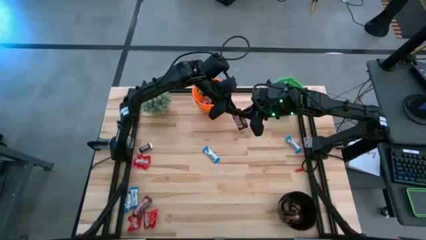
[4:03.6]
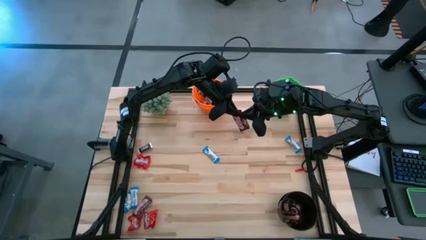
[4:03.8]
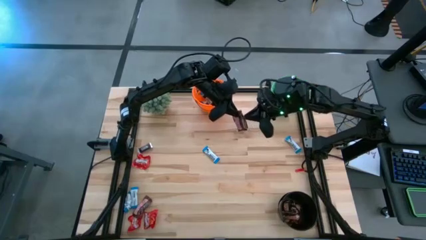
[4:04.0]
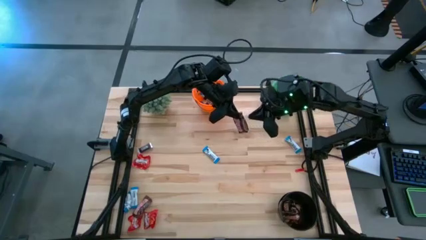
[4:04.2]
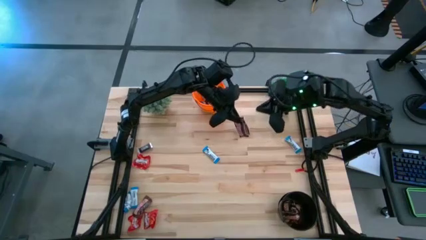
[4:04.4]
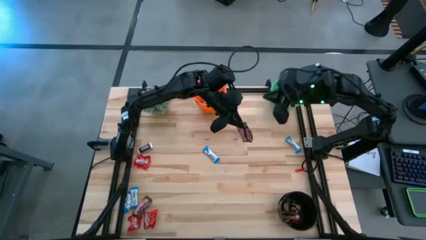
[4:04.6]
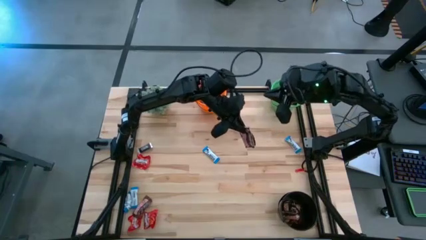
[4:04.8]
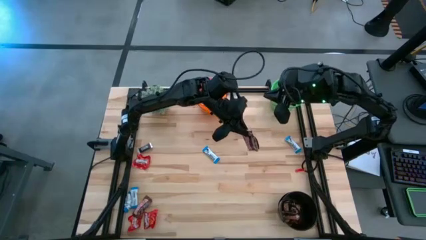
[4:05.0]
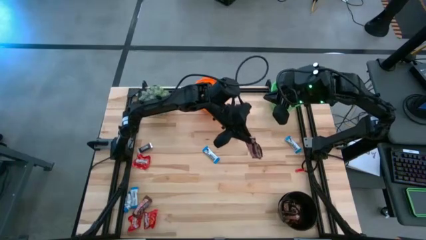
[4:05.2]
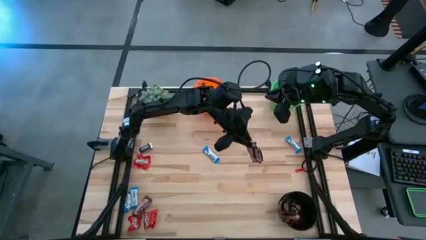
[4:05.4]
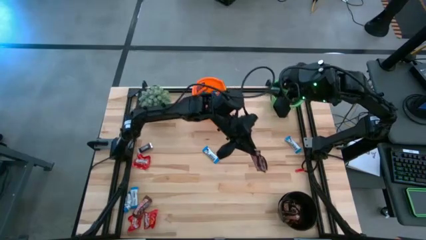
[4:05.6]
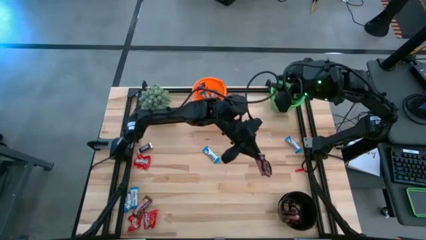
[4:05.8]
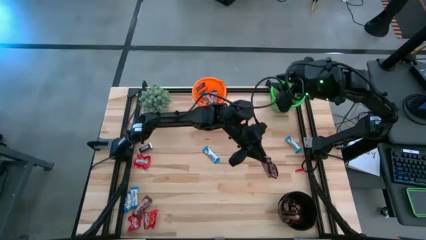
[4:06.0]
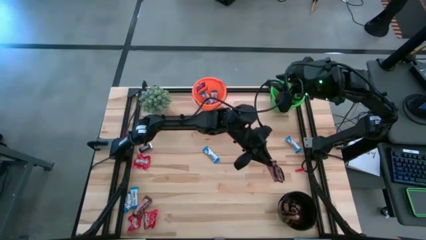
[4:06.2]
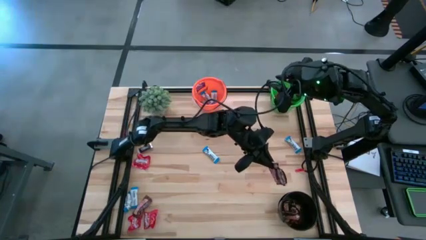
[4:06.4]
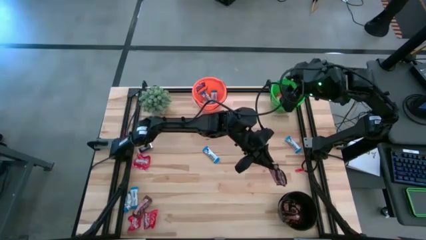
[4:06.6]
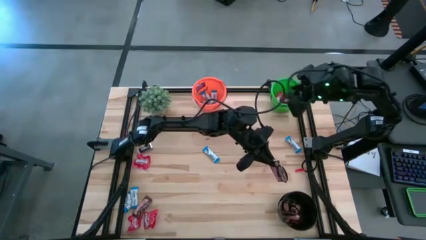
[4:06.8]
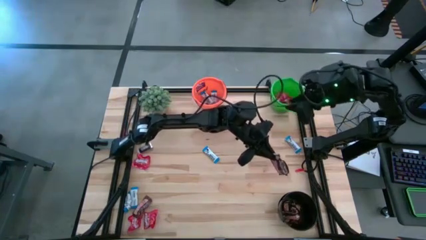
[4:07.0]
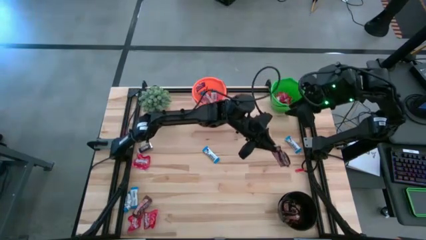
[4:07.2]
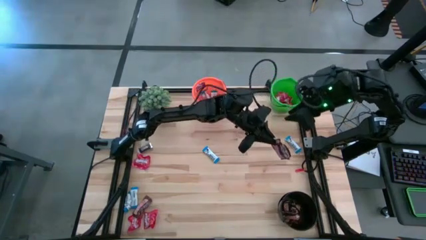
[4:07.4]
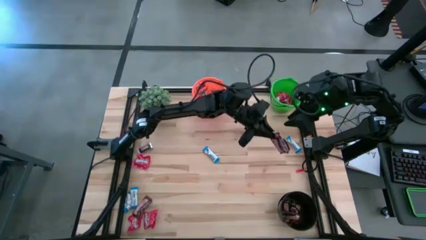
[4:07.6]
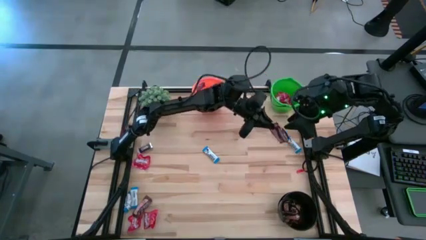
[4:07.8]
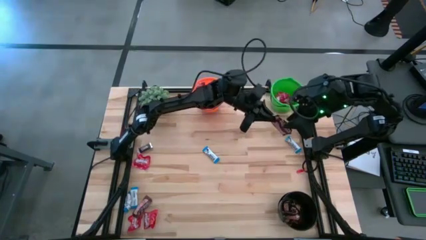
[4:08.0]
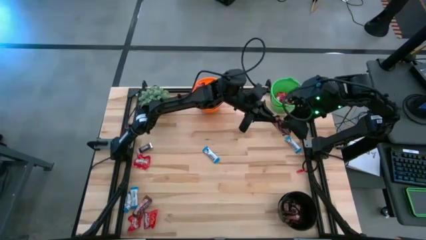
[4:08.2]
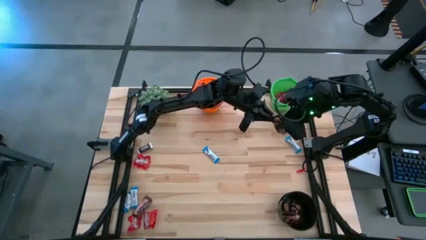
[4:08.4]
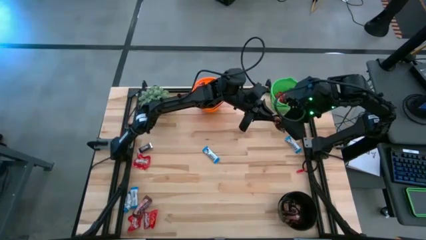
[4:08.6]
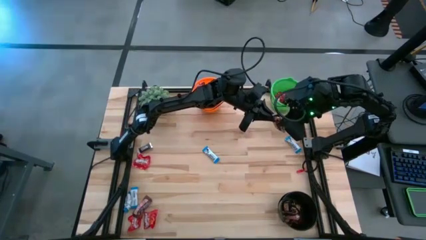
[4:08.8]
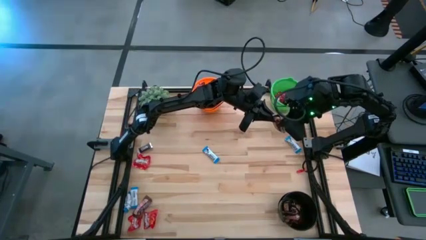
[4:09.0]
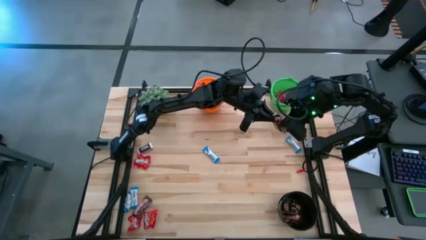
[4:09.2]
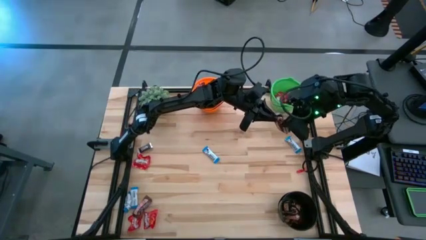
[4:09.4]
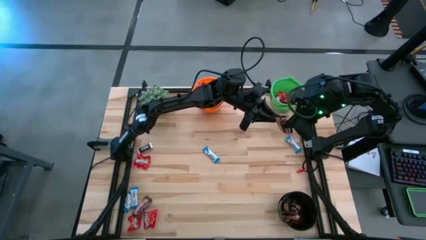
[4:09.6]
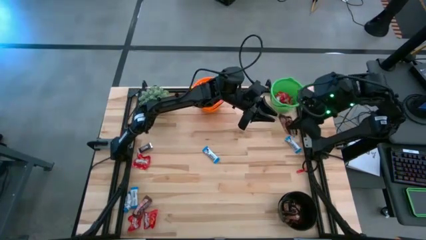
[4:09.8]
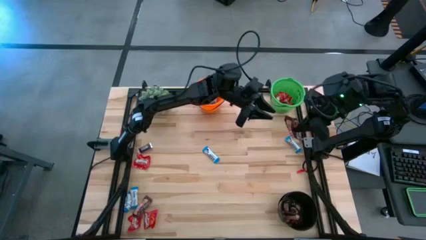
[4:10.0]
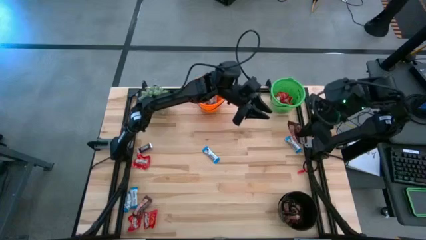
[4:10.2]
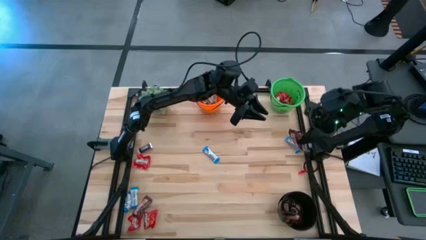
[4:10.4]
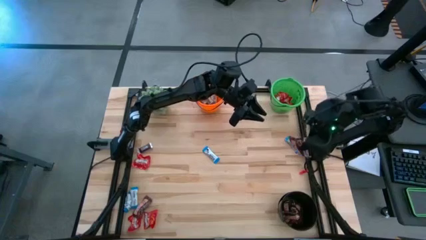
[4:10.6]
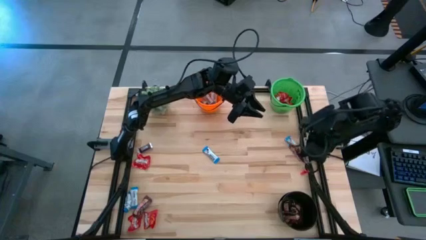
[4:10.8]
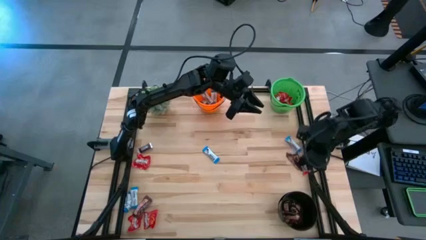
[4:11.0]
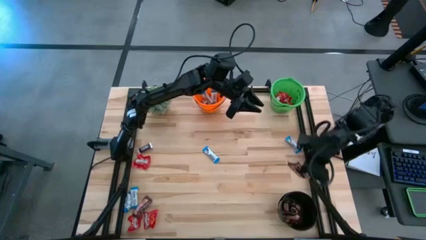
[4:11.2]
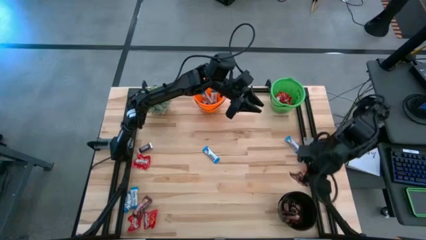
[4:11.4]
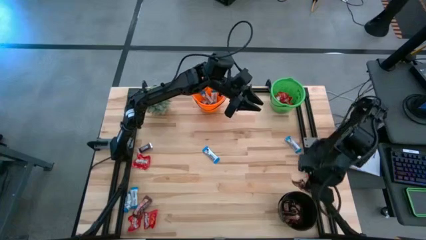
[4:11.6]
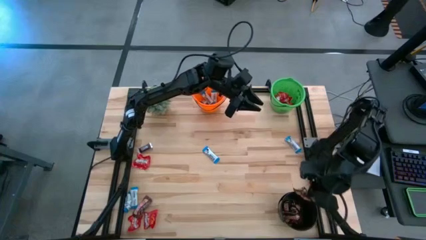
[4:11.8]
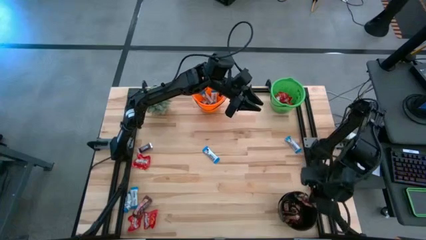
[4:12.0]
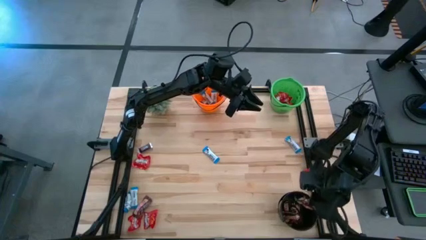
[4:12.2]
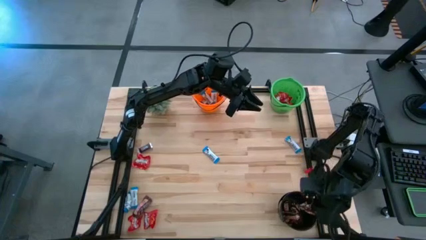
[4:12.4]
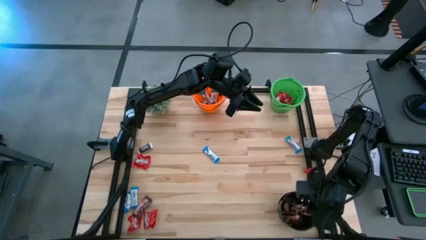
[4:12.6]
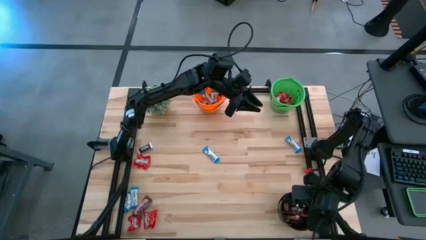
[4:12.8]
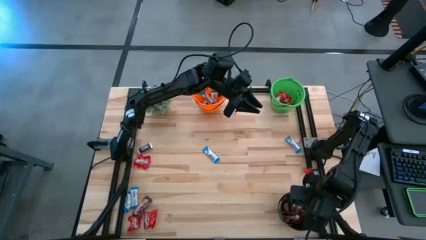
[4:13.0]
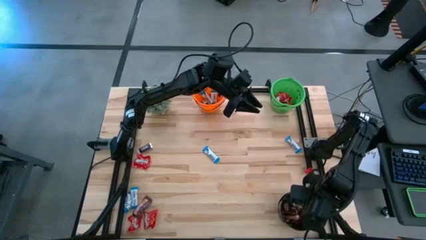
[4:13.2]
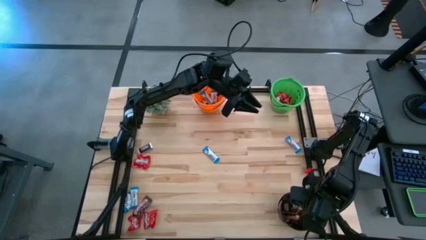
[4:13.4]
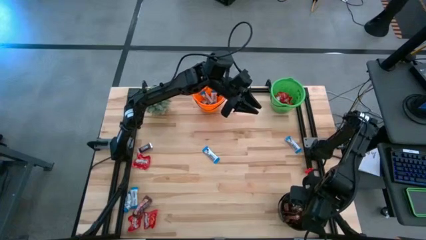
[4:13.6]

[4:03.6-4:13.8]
Task: Organize candy in baskets
Put the brown chocolate bar into the black bucket

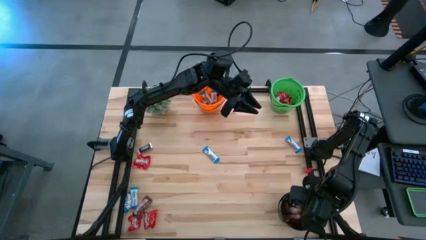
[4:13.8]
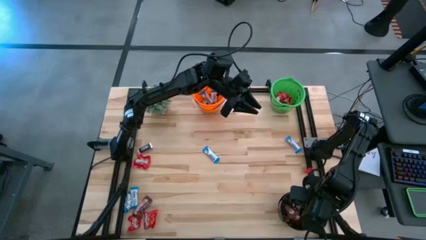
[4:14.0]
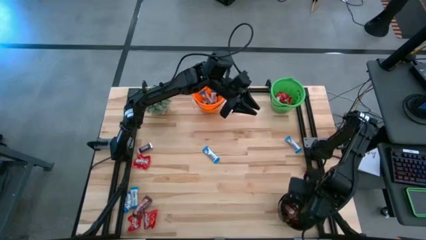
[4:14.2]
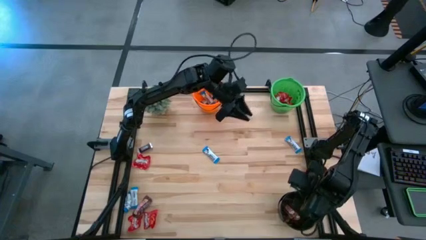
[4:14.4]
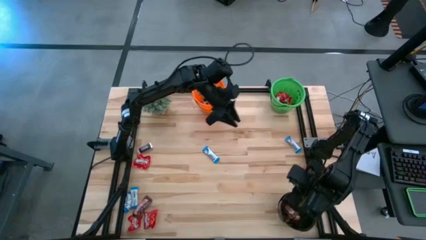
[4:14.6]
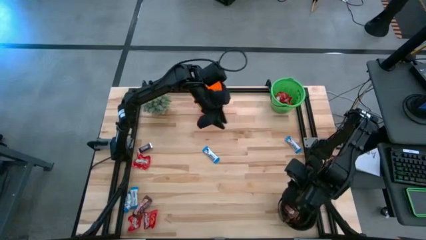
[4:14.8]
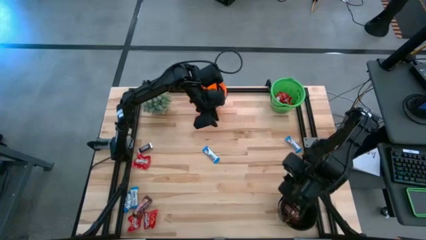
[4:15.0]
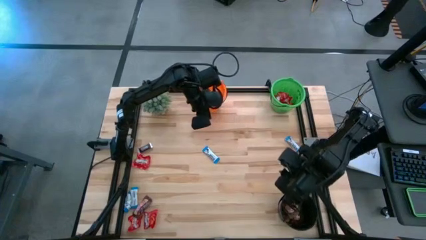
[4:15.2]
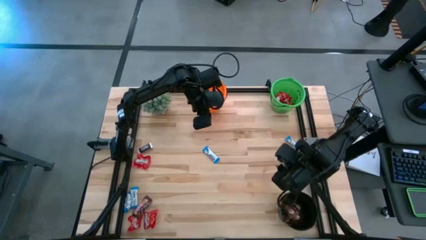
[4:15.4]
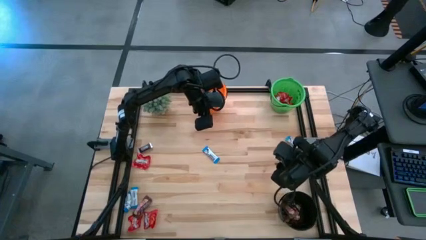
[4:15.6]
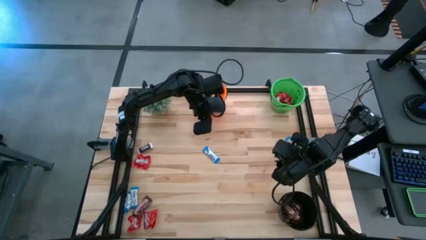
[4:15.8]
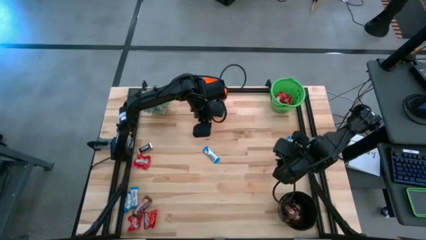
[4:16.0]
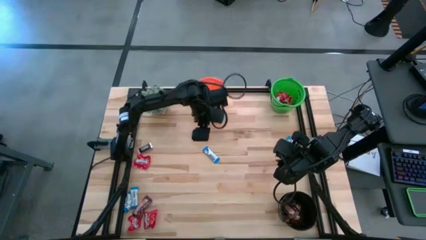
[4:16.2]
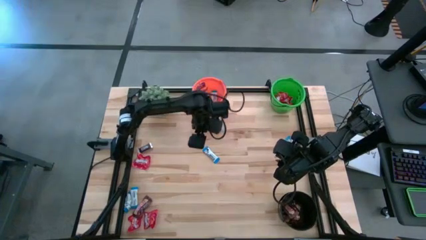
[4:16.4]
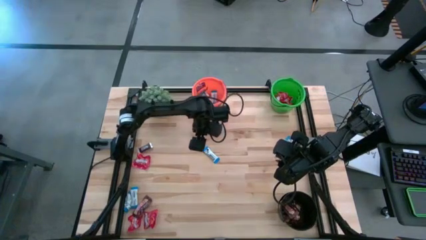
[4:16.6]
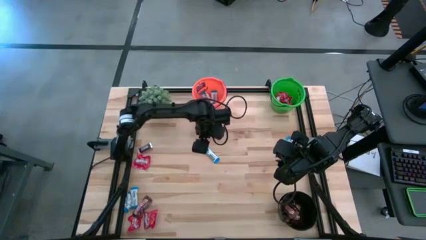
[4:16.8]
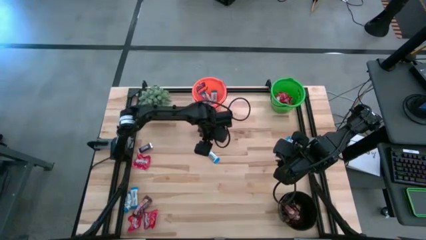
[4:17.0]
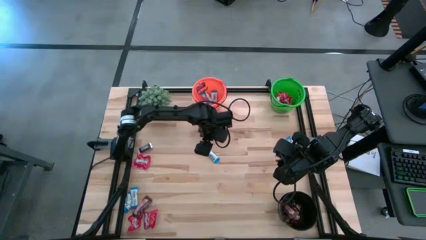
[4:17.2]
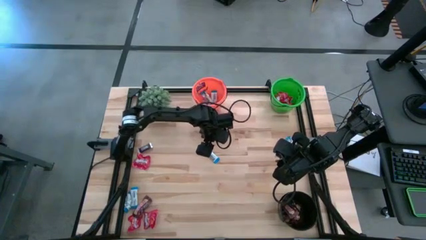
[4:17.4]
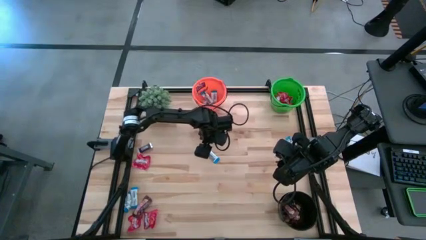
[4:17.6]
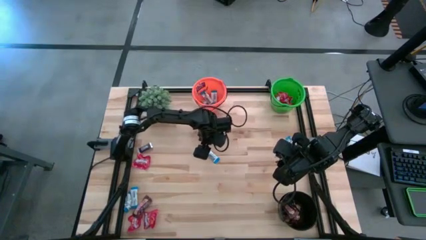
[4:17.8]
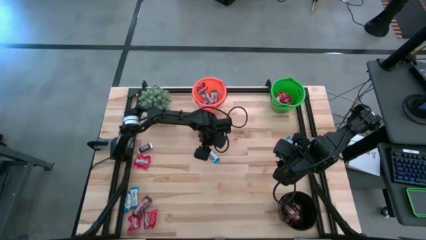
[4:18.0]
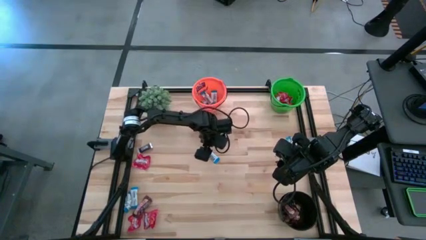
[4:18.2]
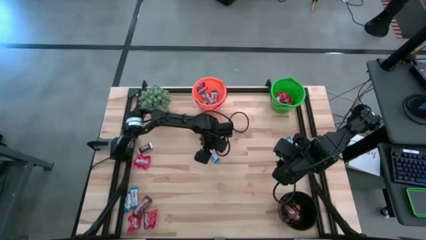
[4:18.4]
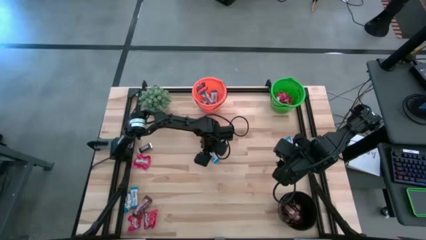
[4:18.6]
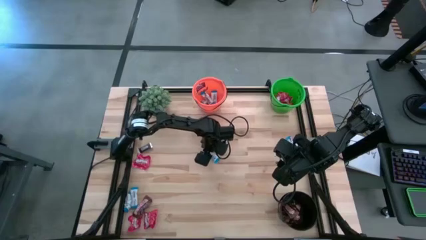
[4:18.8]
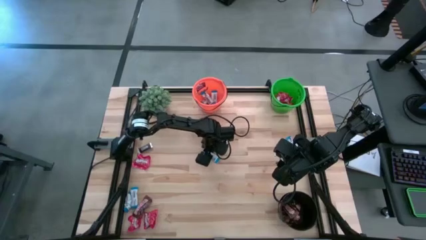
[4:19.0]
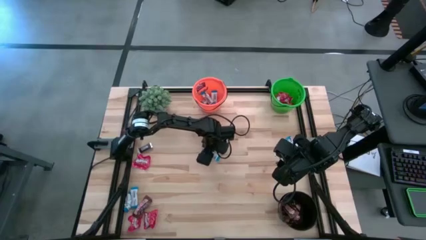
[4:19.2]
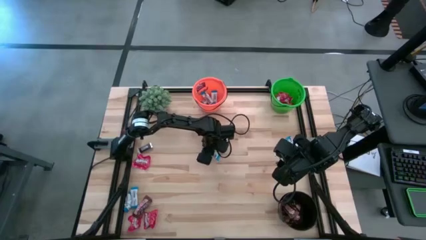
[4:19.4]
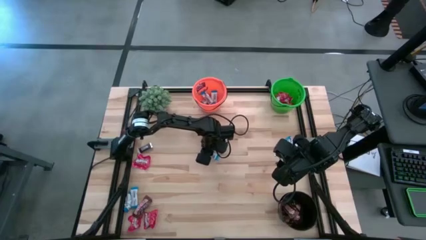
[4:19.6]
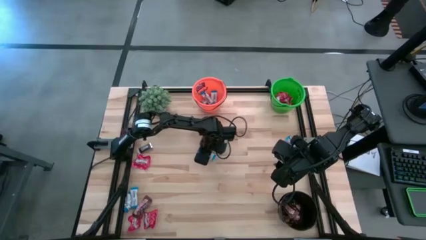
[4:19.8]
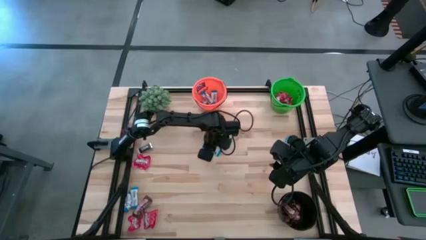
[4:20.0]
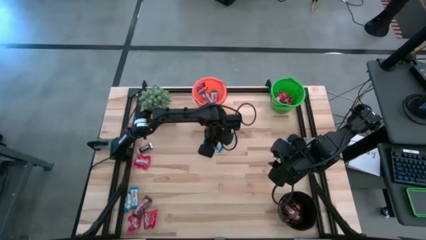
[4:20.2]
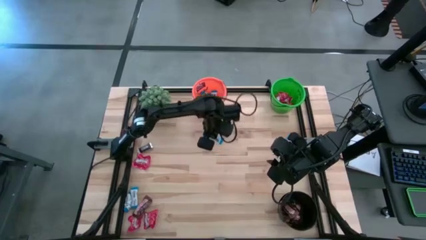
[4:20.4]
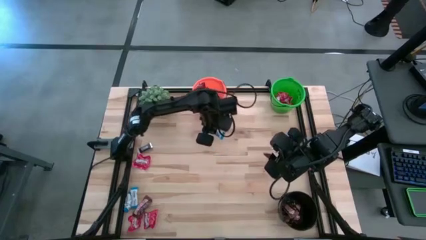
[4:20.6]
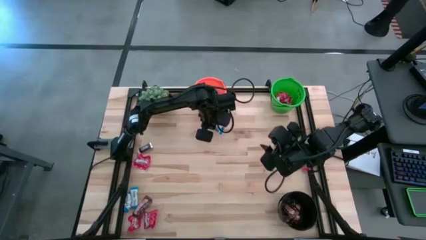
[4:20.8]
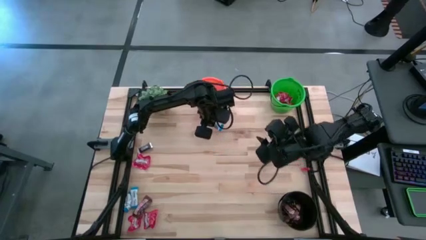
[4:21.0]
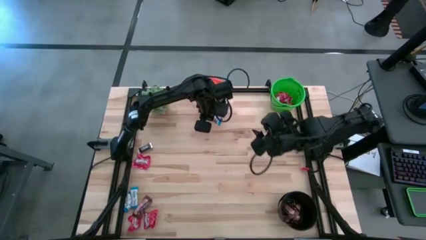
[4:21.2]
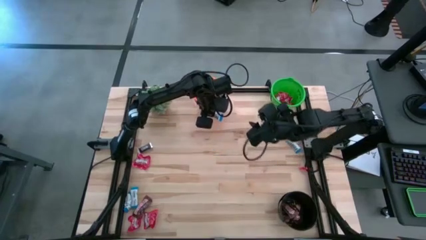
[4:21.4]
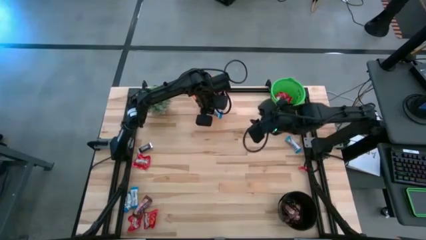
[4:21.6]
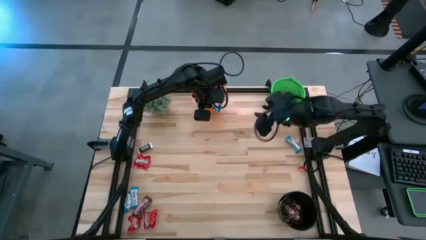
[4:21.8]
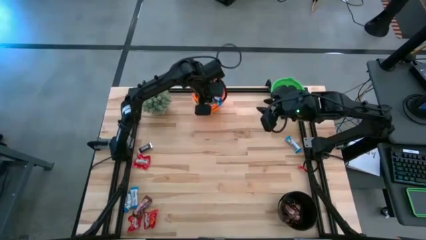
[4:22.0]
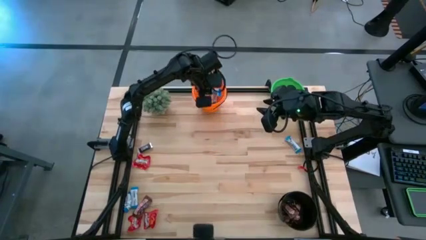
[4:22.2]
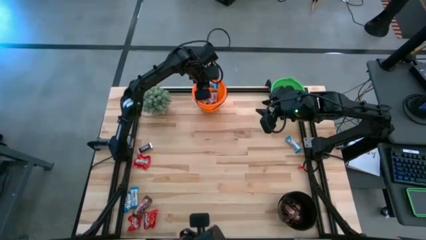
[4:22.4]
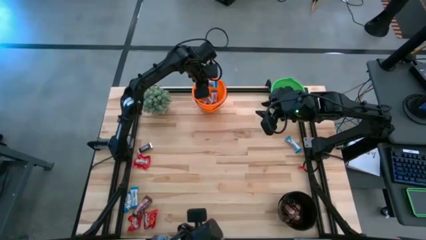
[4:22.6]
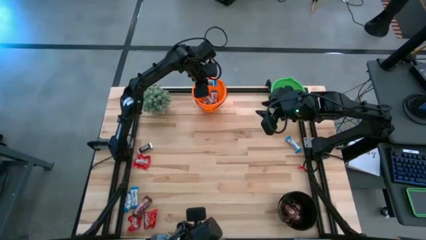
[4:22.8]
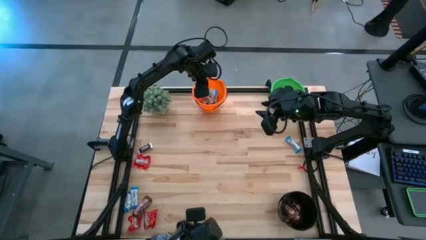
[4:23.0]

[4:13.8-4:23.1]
Put the white chocolate bar into the orange bucket
